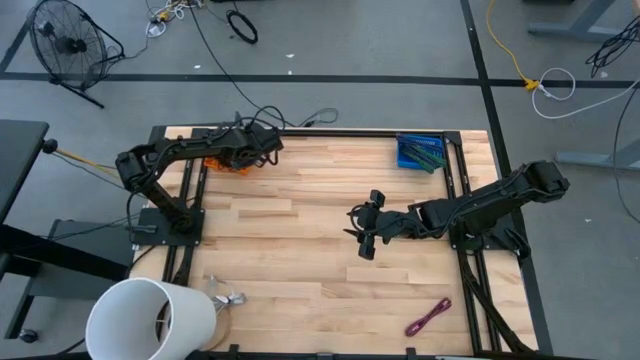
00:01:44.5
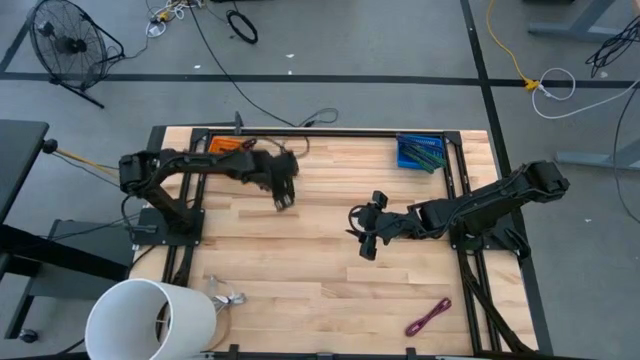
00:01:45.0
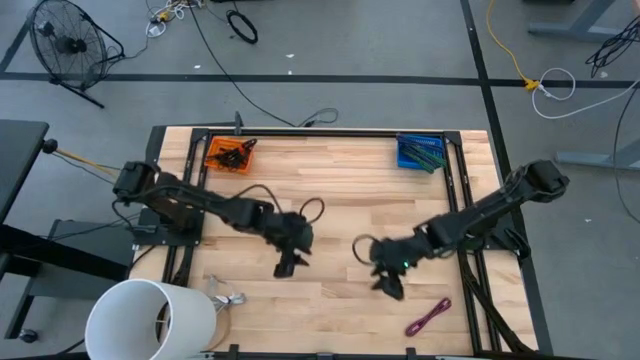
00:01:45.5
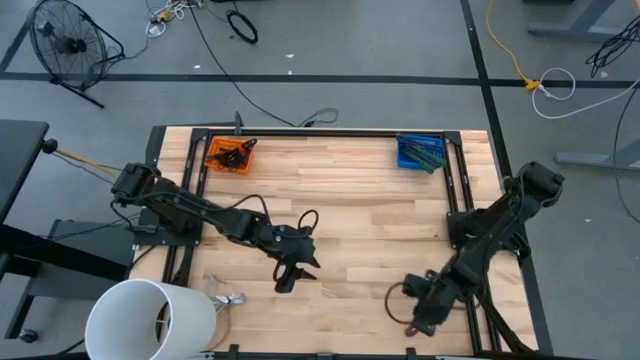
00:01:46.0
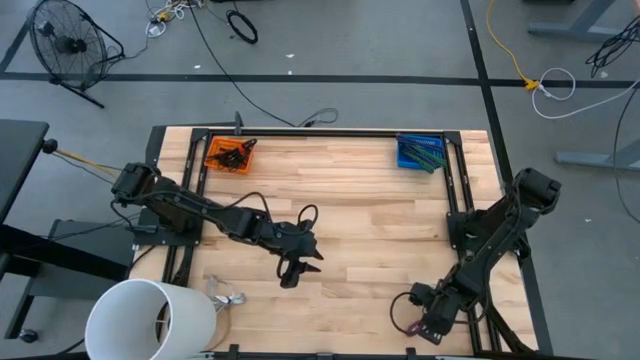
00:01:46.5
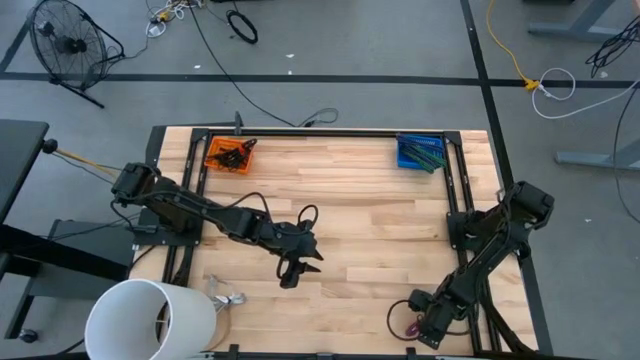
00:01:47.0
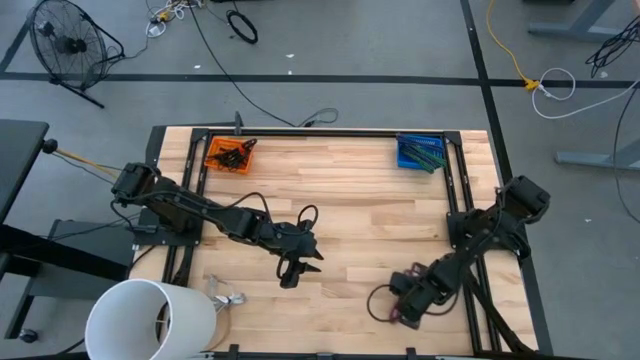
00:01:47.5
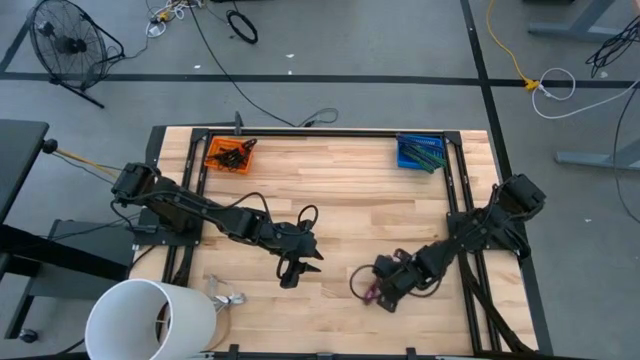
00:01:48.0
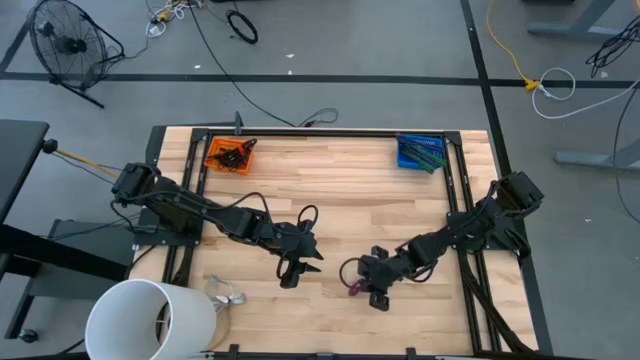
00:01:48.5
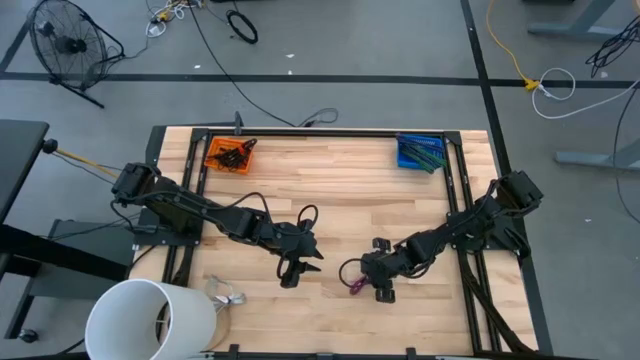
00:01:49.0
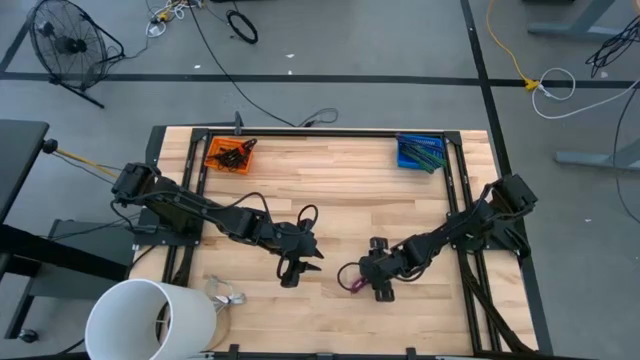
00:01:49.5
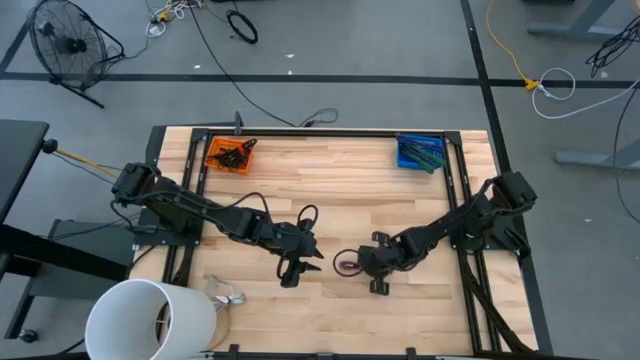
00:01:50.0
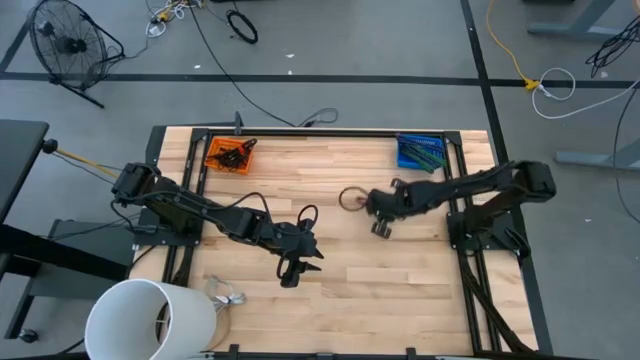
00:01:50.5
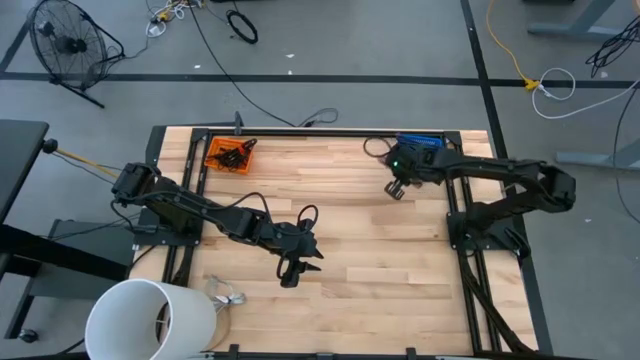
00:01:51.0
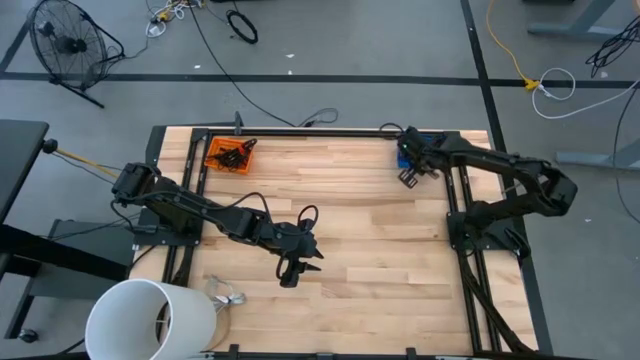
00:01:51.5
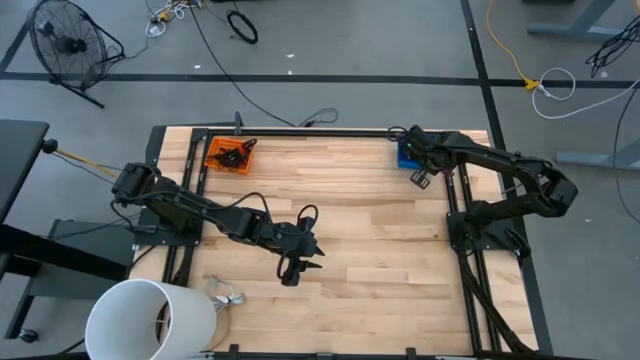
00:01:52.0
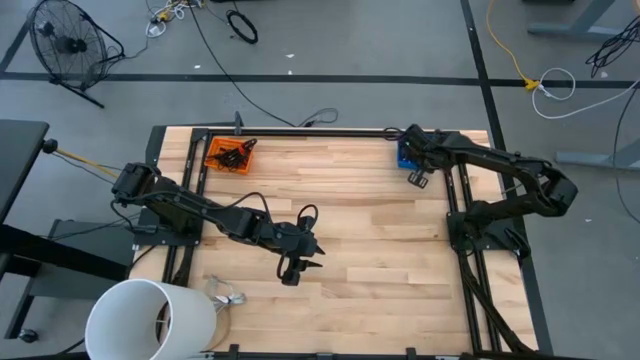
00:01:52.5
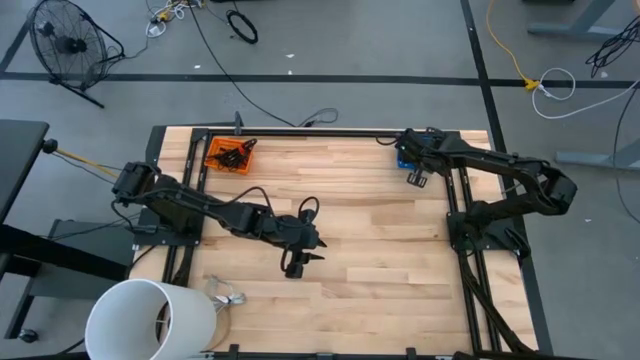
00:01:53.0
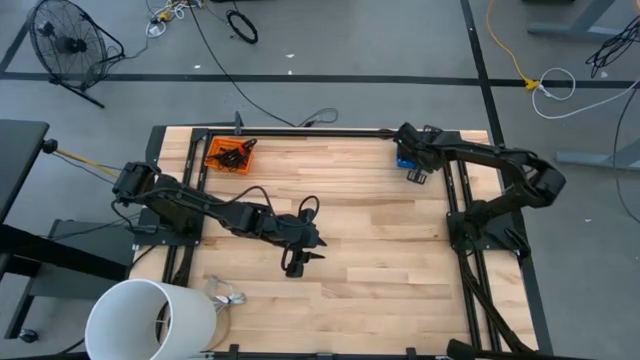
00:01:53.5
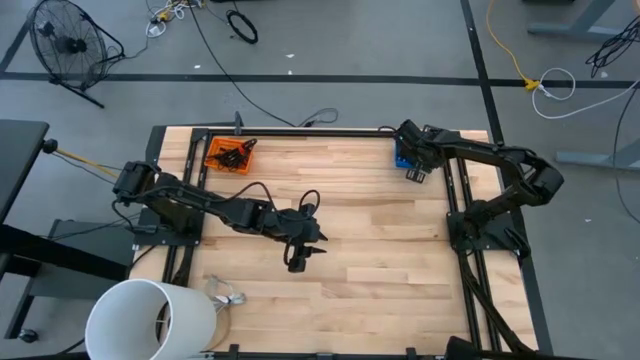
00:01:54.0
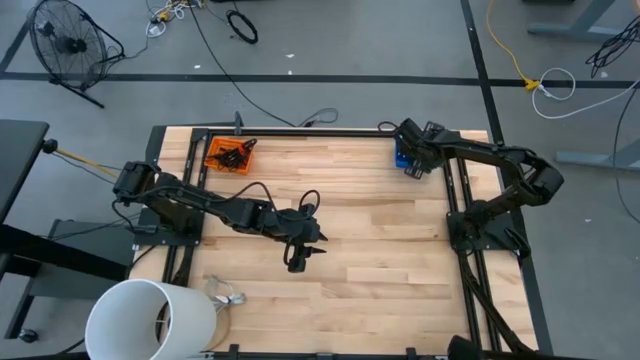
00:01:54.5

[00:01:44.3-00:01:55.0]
Task: Pick & Place USB Port
Put the pink charger cable into the blue bin

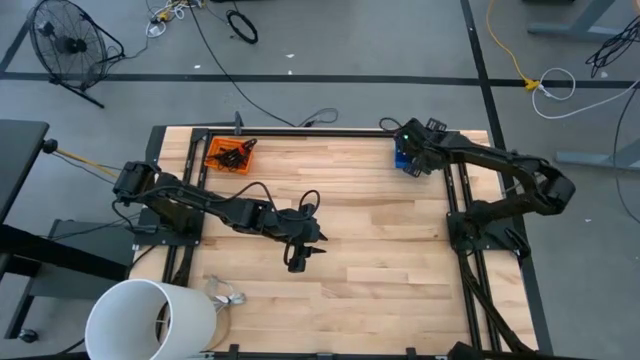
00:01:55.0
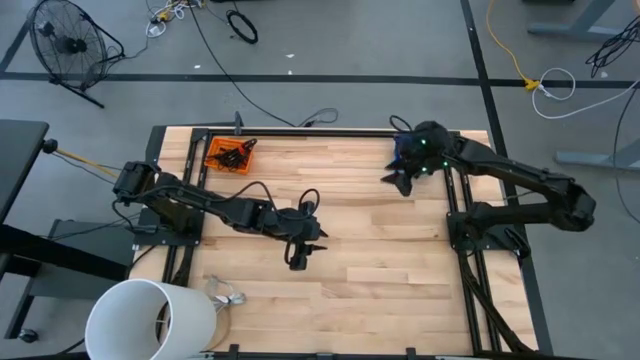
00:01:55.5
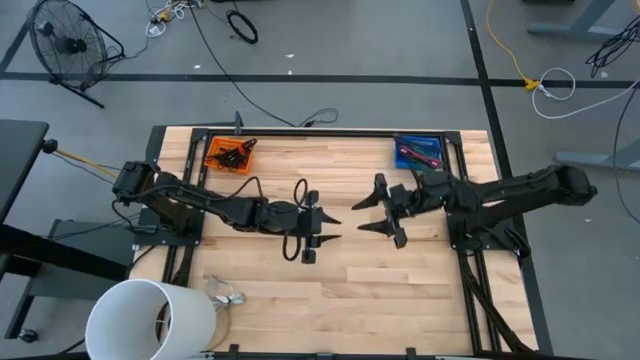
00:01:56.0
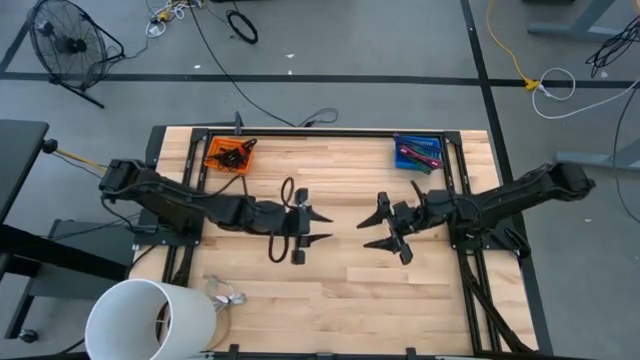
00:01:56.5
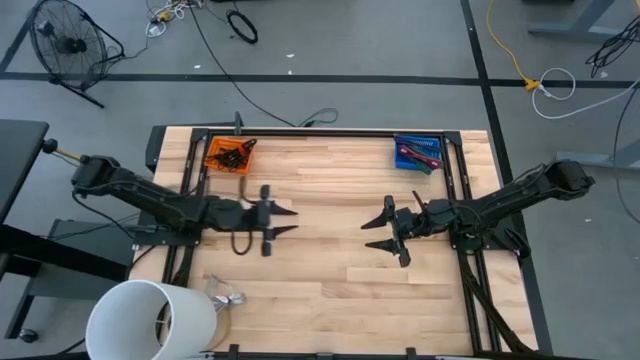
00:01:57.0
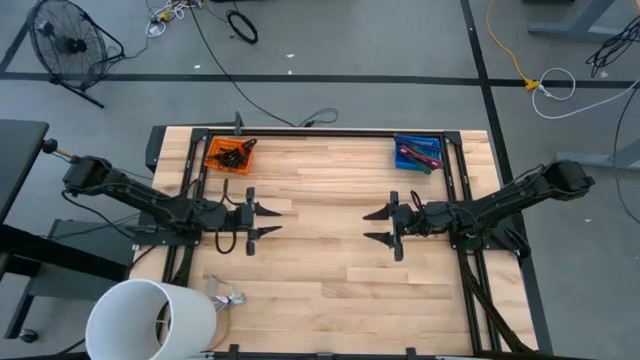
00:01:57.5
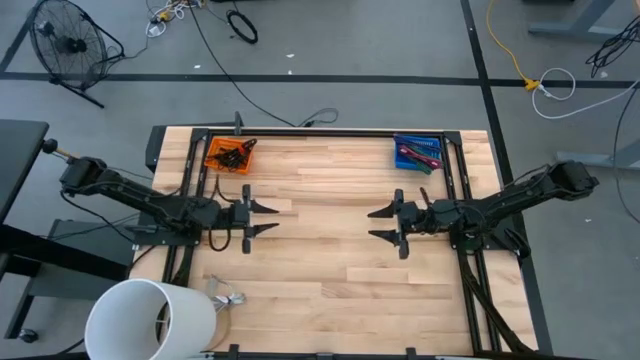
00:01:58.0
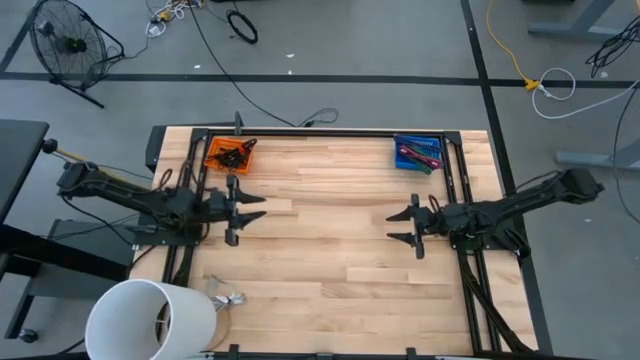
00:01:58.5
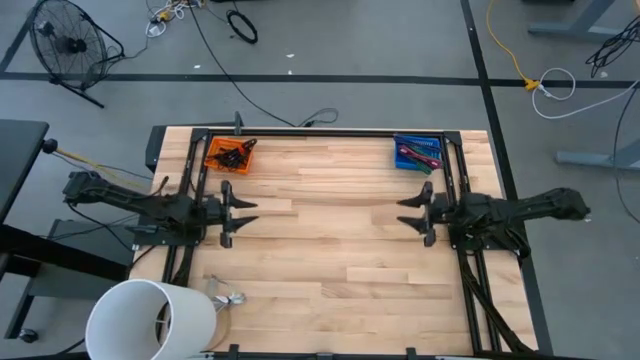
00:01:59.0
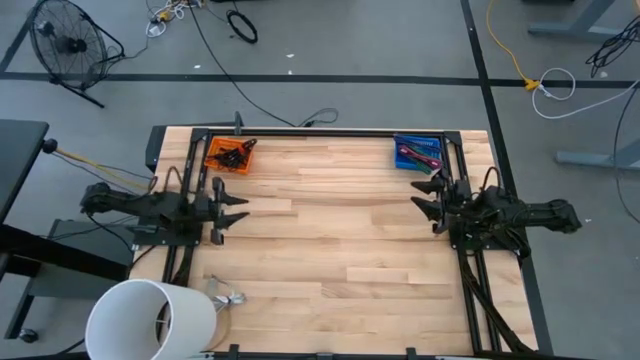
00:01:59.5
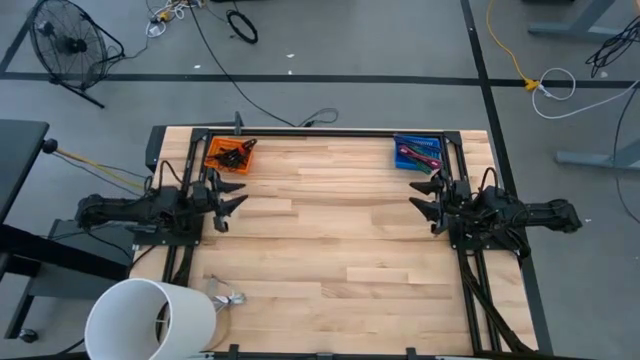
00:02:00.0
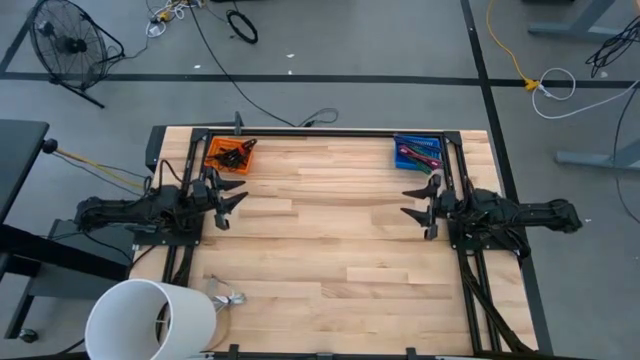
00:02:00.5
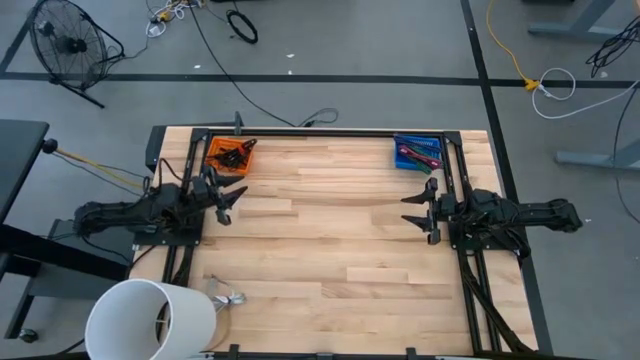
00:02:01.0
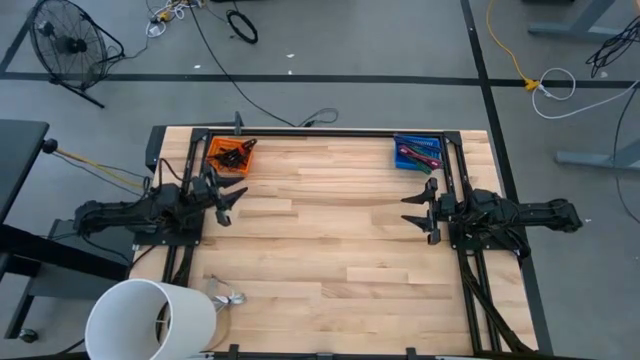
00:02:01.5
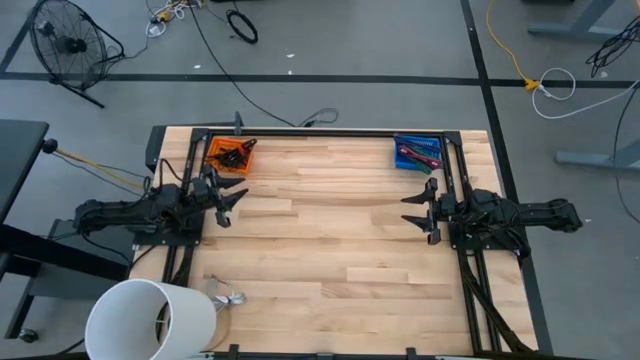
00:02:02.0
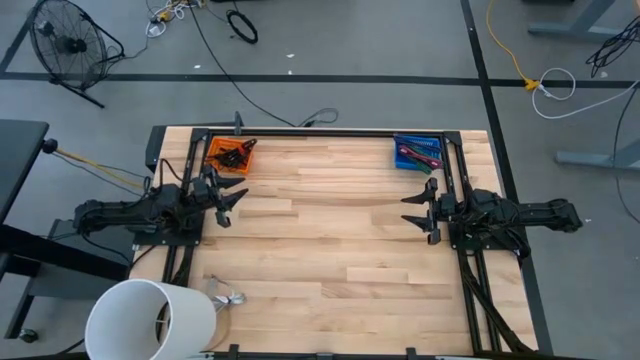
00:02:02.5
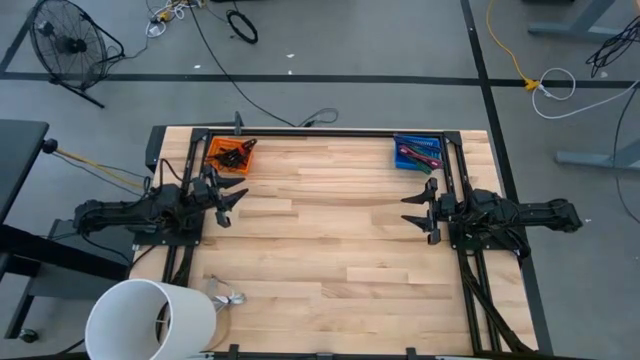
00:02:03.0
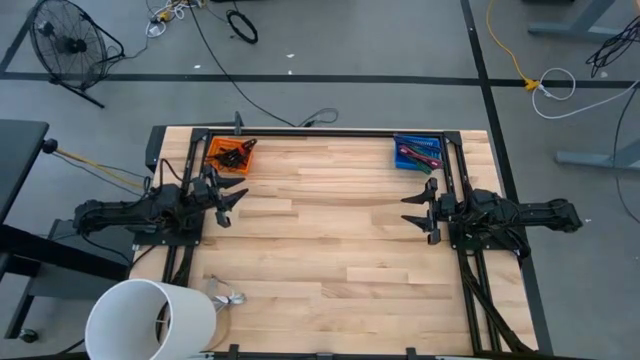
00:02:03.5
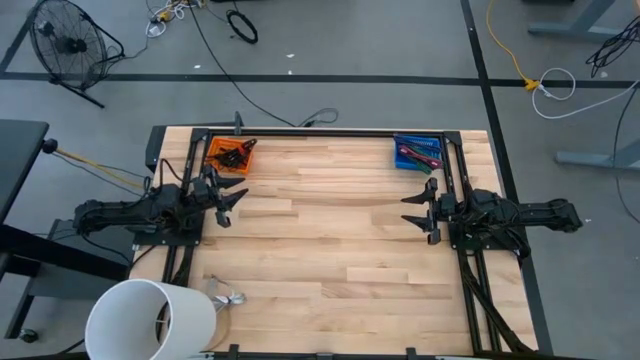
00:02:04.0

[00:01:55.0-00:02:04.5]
Return to Home Position

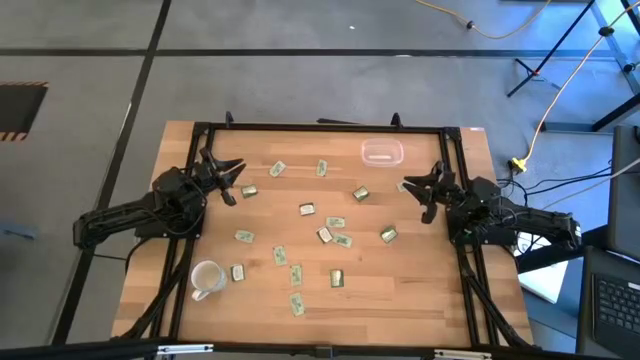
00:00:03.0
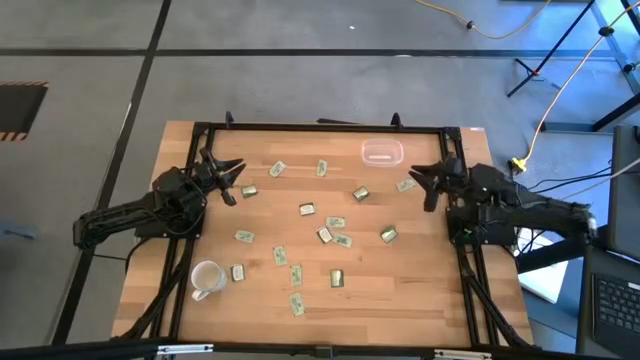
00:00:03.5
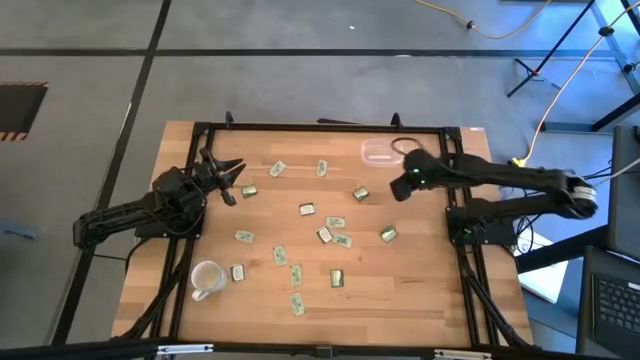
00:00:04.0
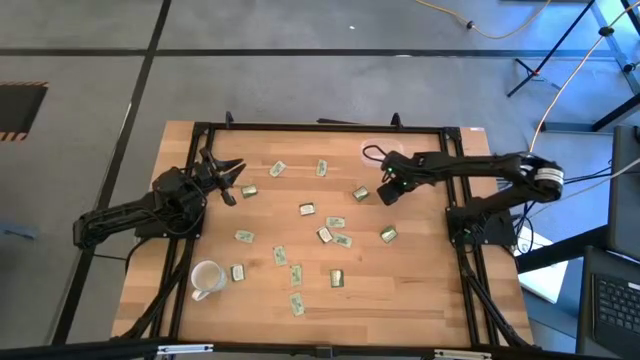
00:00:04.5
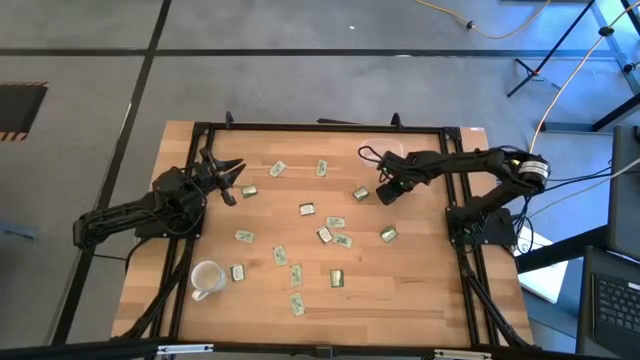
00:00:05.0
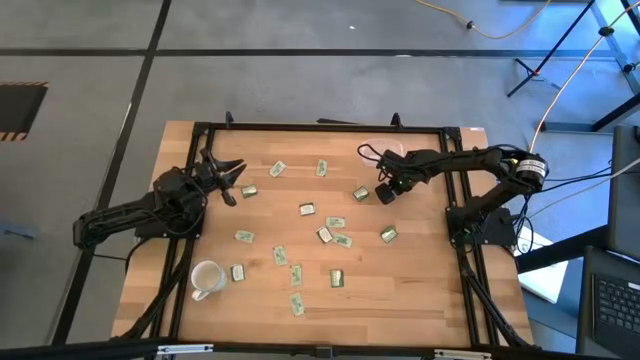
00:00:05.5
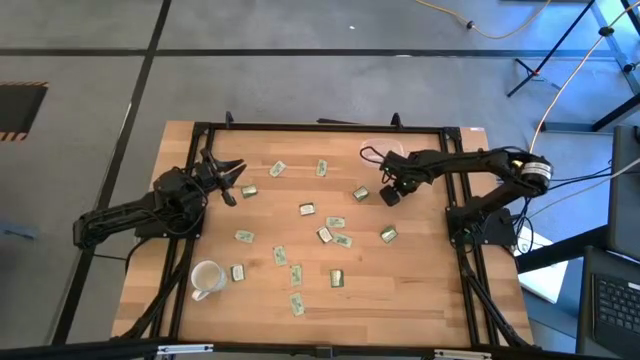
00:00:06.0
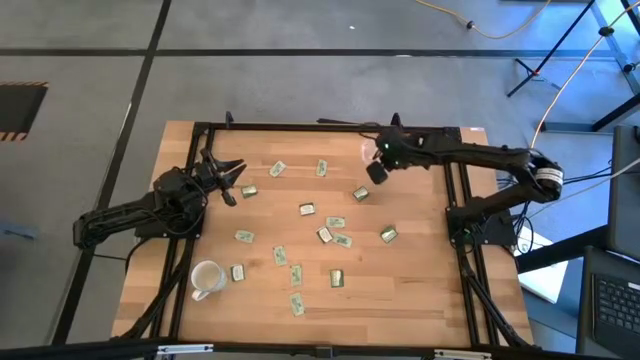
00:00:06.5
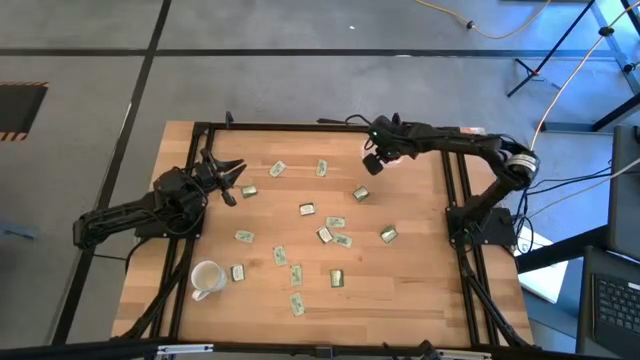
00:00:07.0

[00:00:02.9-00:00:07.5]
Task: Pick and place Stevia / Truvia into bins
Put the green stevia packet into the transparent container
